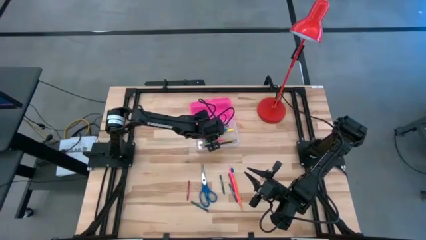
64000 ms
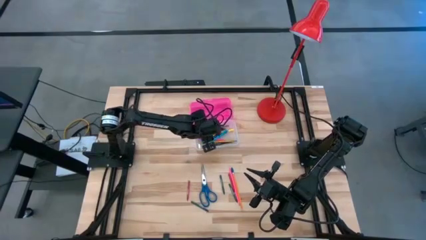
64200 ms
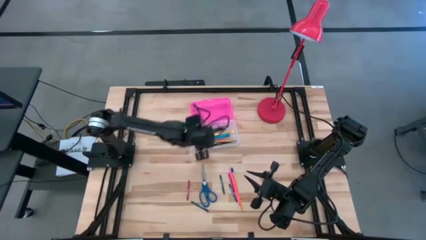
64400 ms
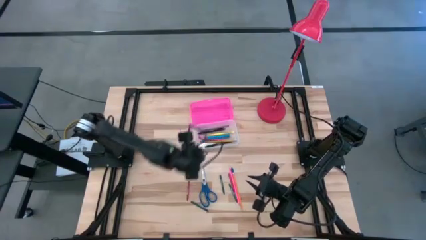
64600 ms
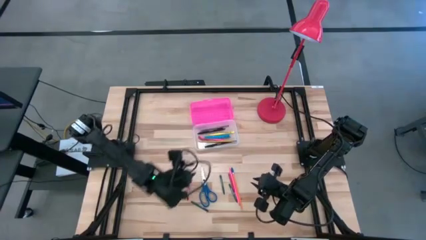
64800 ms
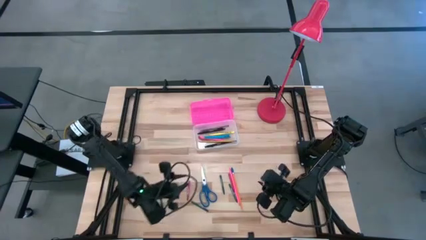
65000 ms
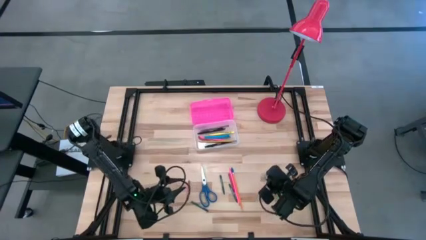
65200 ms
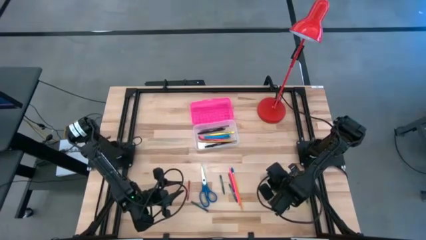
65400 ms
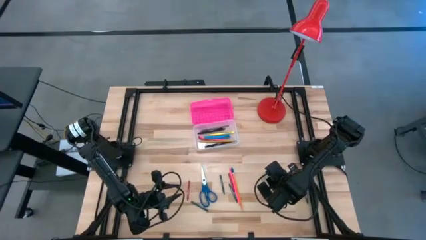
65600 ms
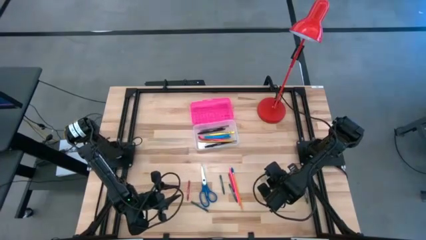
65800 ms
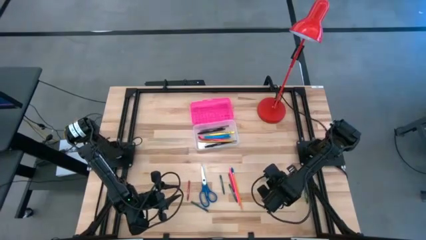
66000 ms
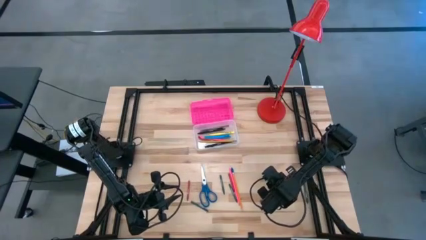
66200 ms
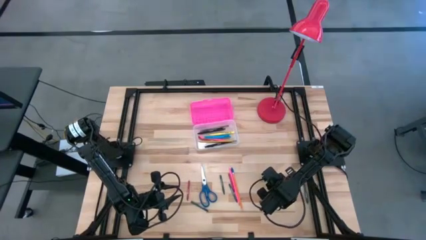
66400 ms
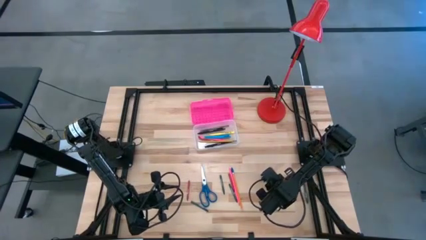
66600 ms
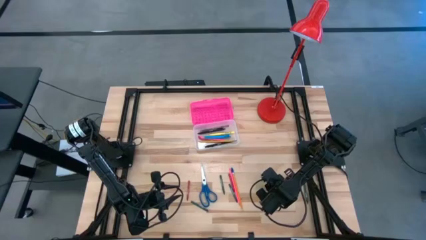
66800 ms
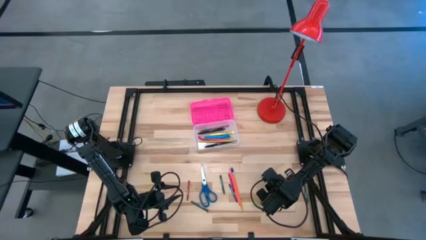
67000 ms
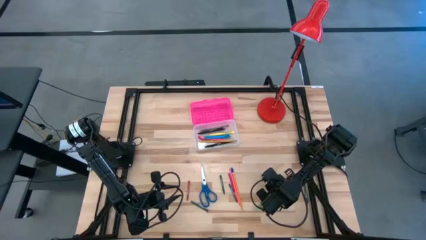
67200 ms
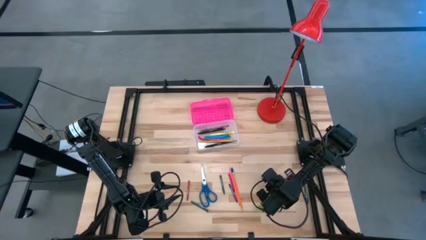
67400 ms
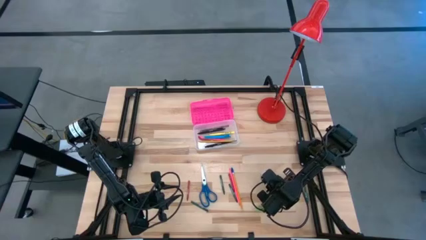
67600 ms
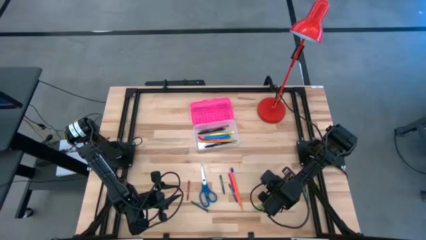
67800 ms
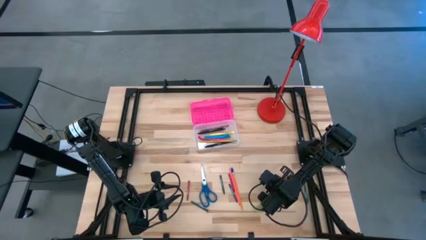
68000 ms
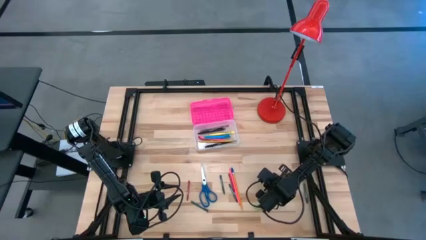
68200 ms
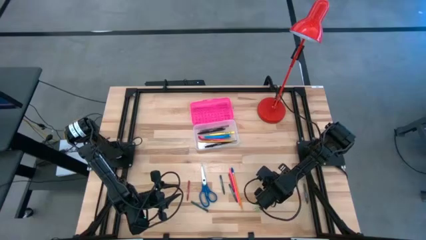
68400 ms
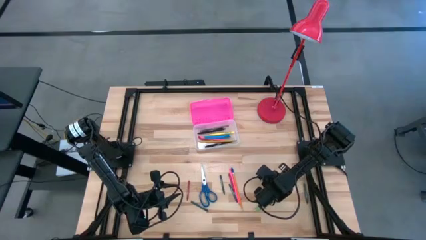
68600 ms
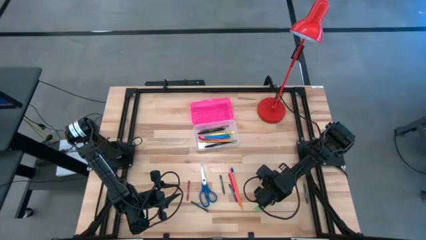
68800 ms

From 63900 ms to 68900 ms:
Task: Pick & place school supplies into a supply box
Put the black pen into the pink supply box

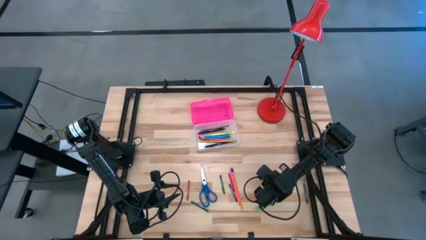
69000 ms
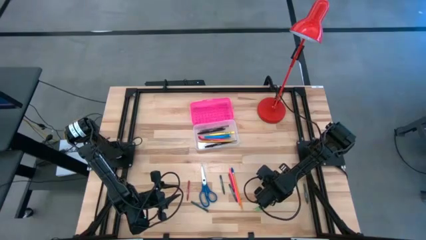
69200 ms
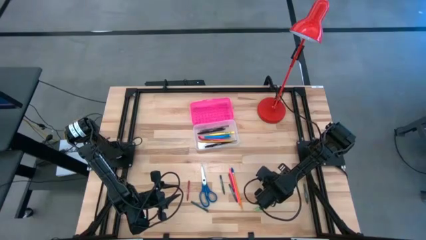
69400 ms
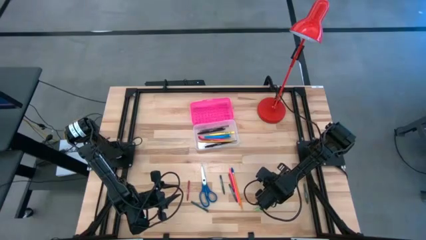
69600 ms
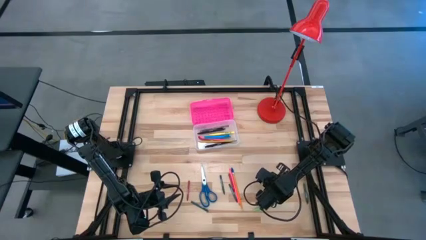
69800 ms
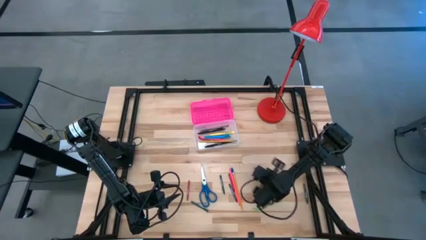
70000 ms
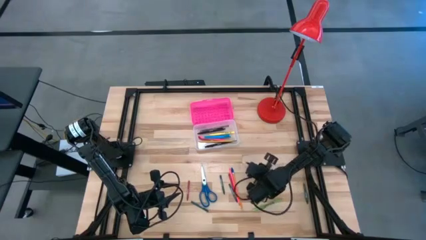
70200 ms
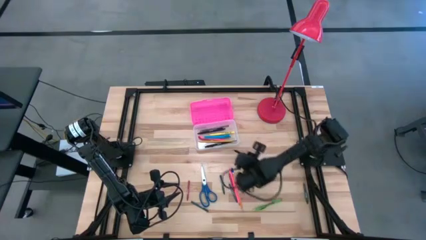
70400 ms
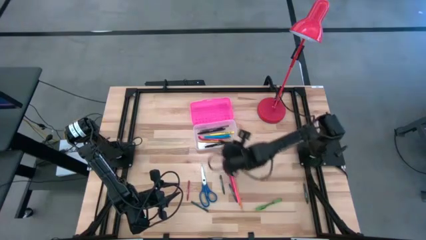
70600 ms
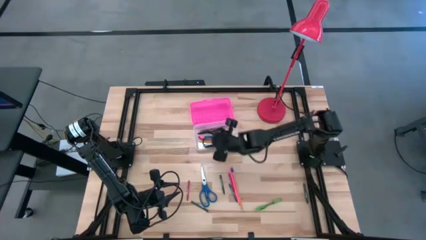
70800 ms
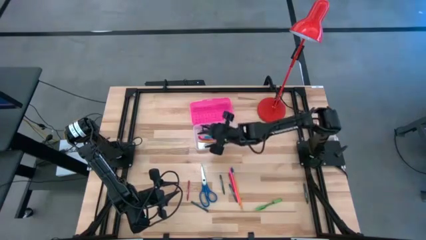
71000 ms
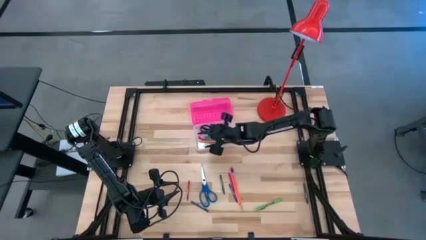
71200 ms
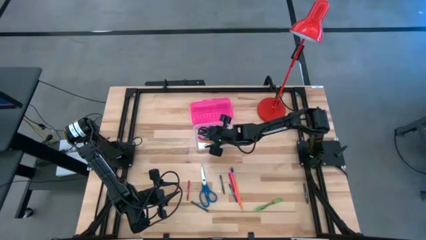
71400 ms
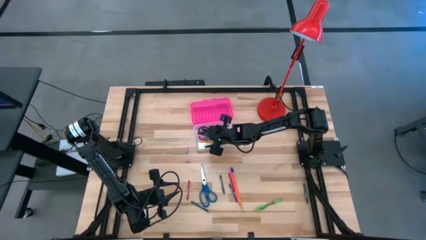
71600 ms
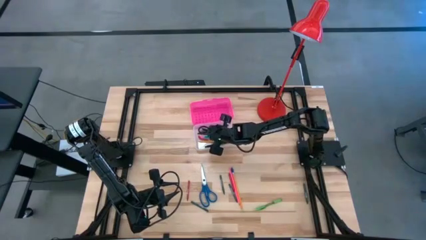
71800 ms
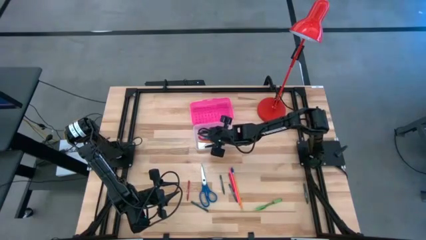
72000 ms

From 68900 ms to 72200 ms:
Put the black pen into the pink supply box

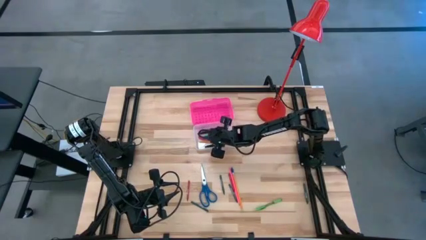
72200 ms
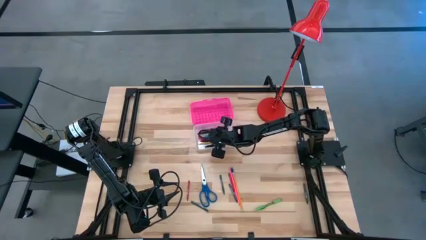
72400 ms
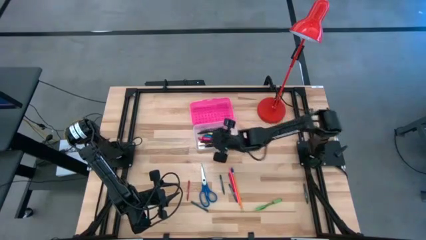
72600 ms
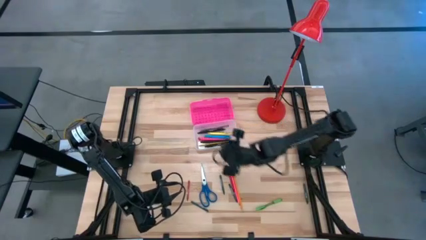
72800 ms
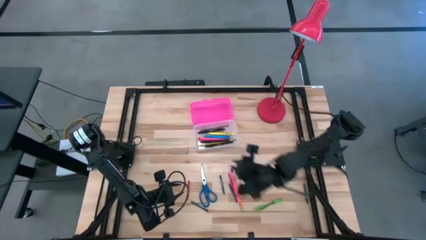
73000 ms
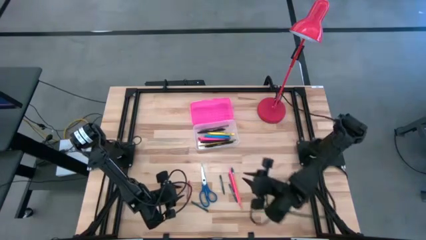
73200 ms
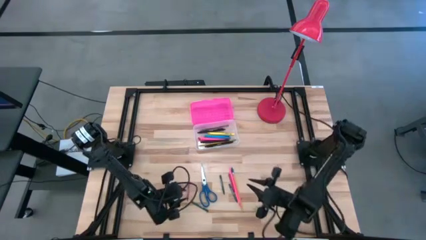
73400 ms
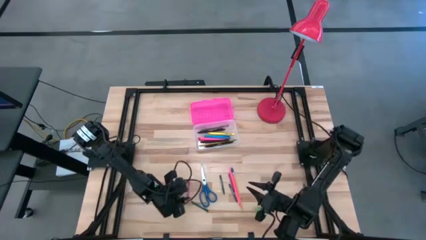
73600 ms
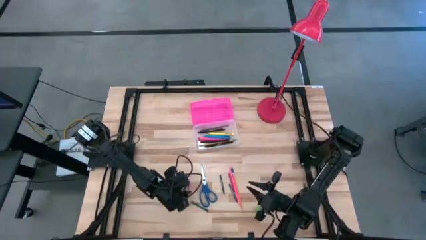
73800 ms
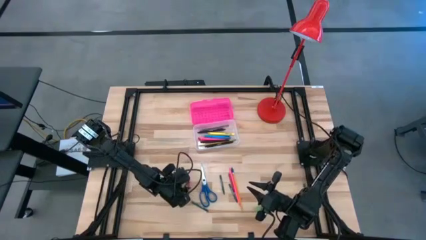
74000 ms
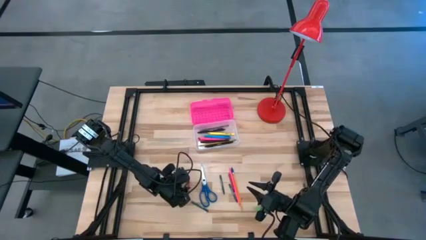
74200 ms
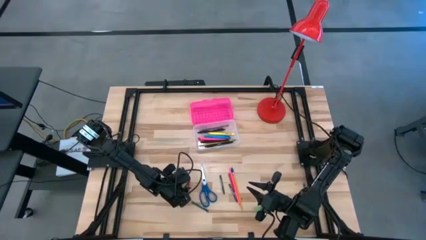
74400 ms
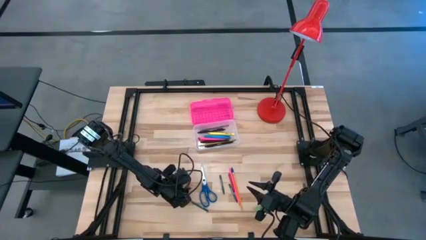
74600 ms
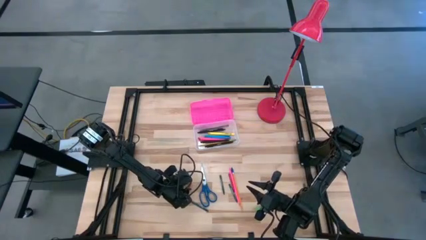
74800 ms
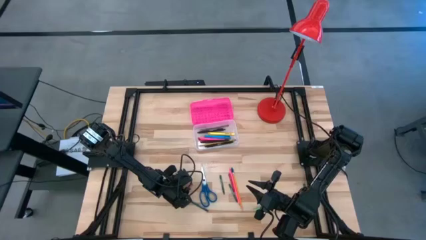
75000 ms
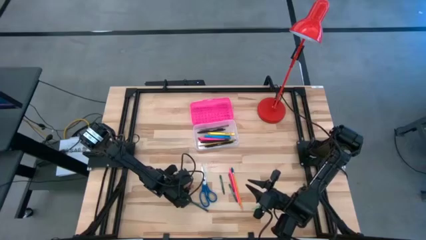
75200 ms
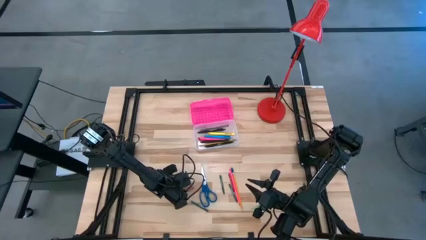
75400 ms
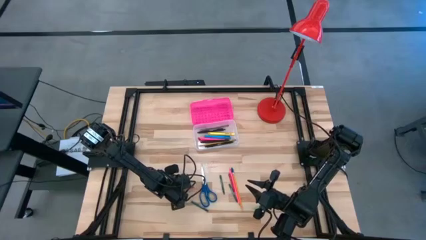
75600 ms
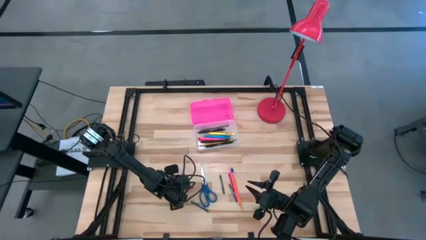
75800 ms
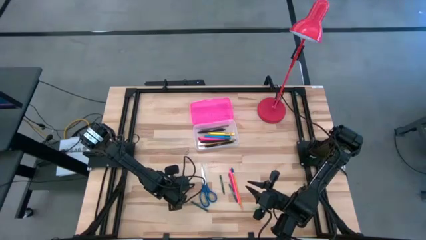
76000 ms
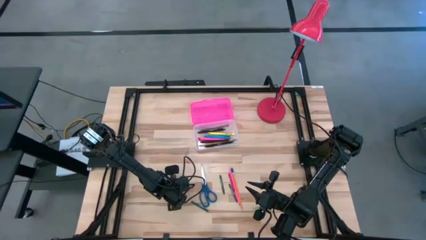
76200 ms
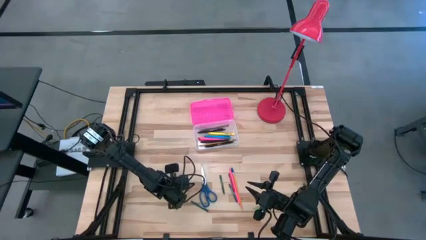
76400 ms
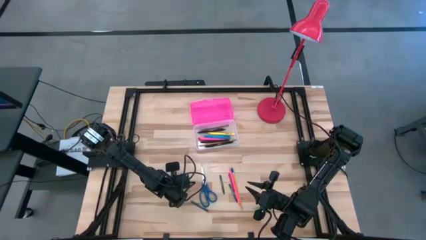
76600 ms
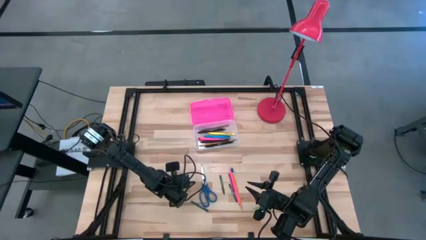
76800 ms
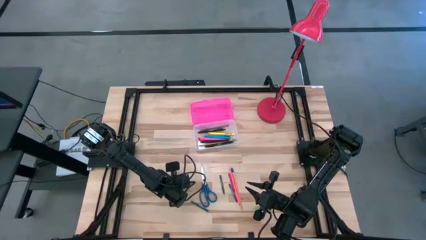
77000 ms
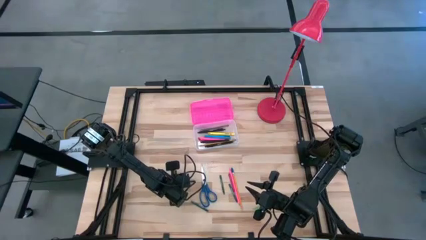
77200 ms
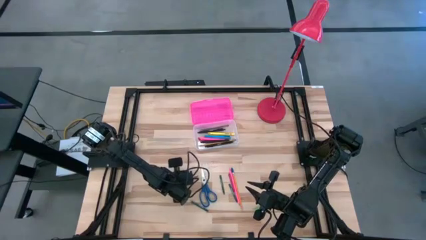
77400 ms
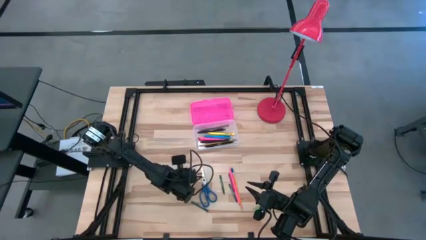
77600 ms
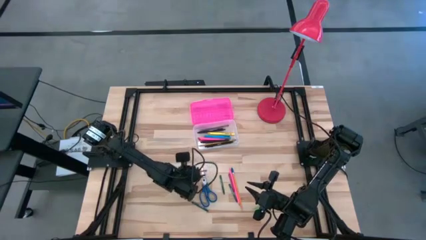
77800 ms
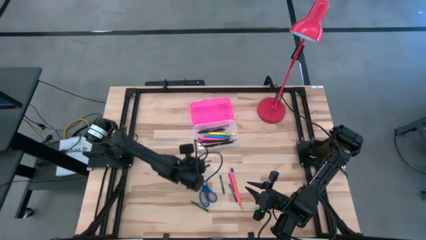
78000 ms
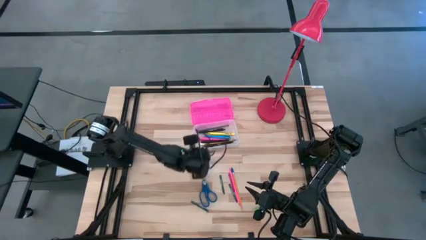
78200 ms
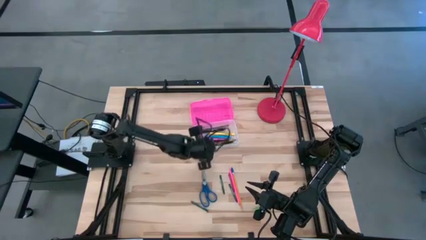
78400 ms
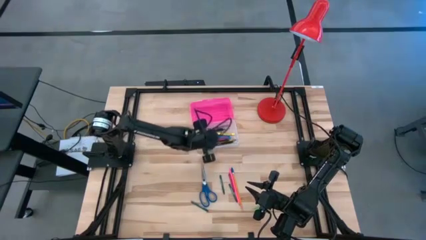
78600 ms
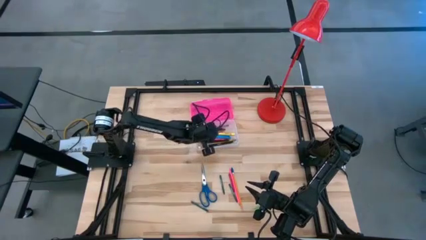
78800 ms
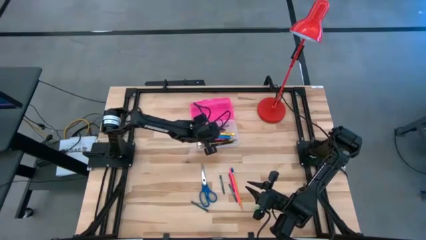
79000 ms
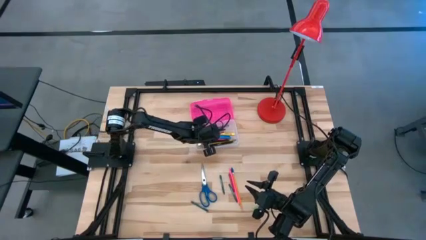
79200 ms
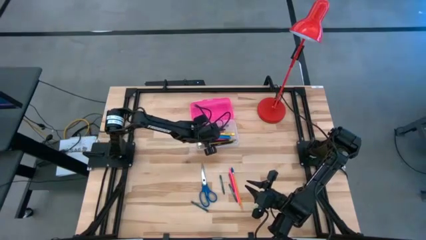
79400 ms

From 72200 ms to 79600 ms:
Put the red crayon into the pink supply box
